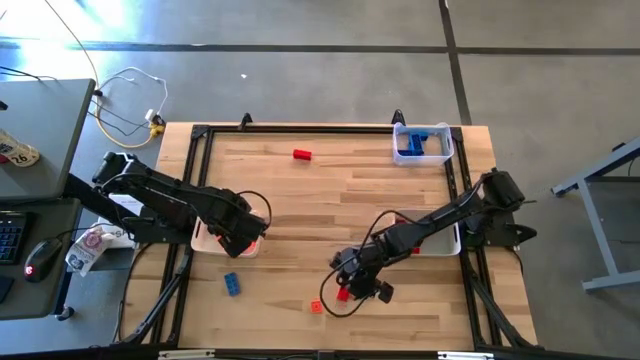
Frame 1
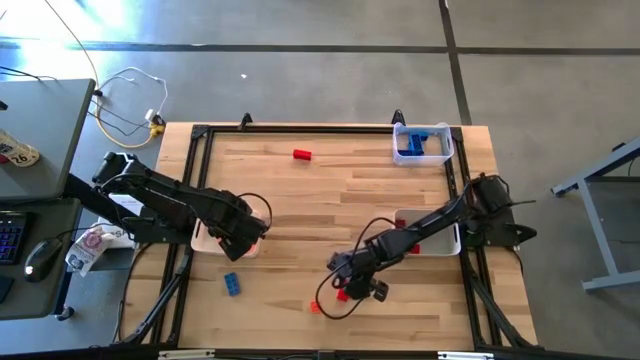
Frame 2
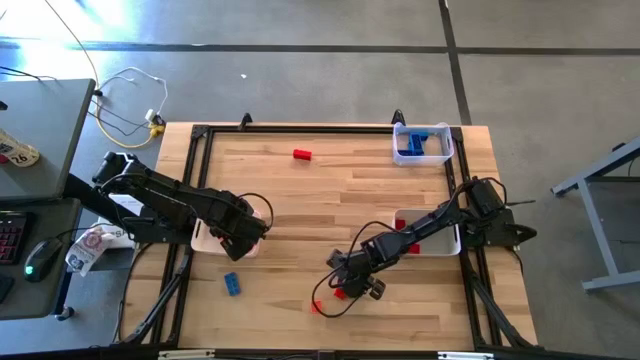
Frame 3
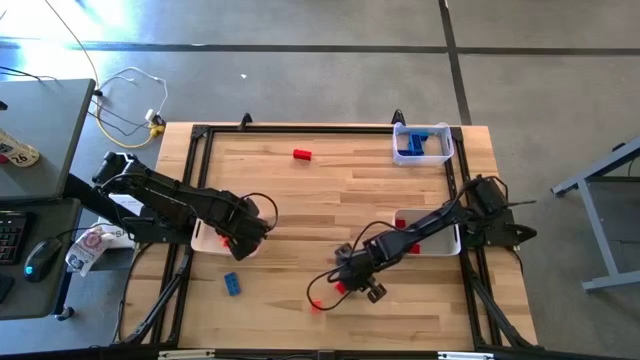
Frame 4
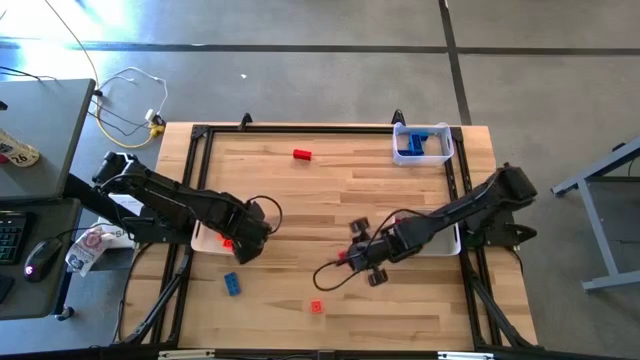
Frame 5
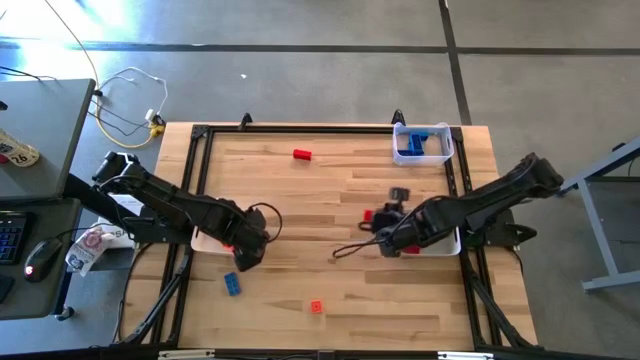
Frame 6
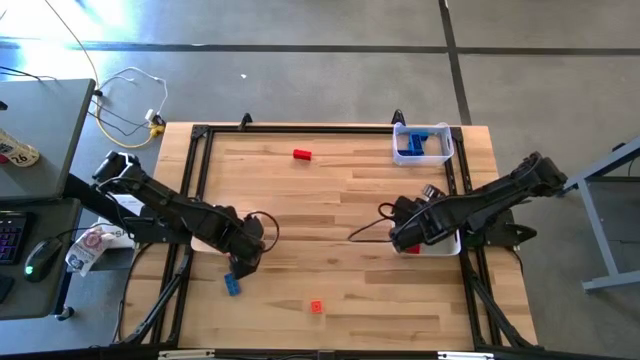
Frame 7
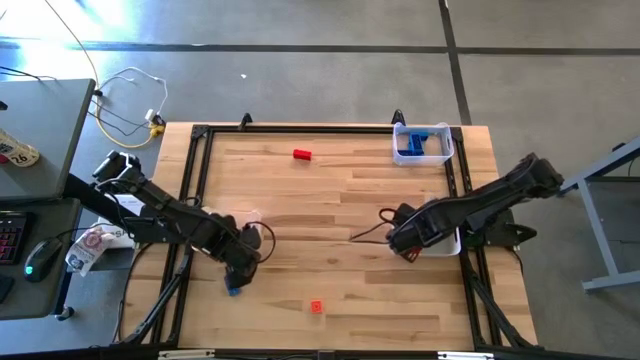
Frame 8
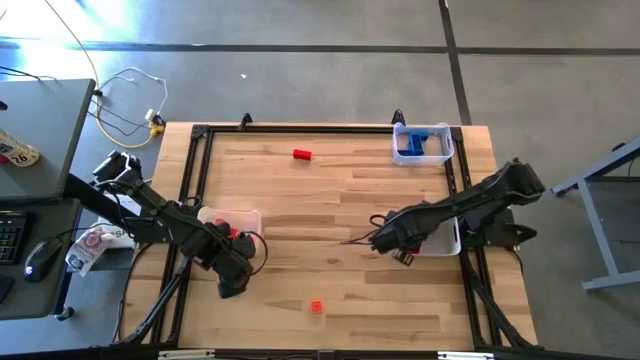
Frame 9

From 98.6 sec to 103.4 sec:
Task: Sort & place blocks by color
Put the red game piece into the gray bin

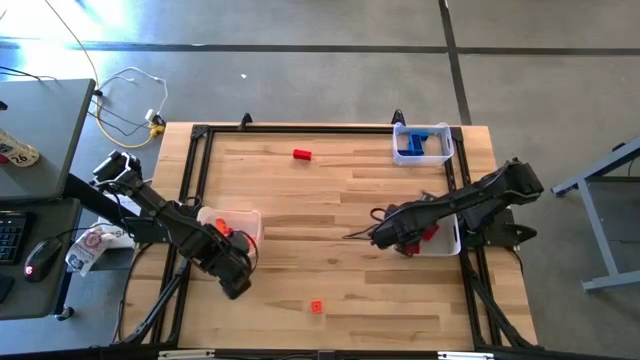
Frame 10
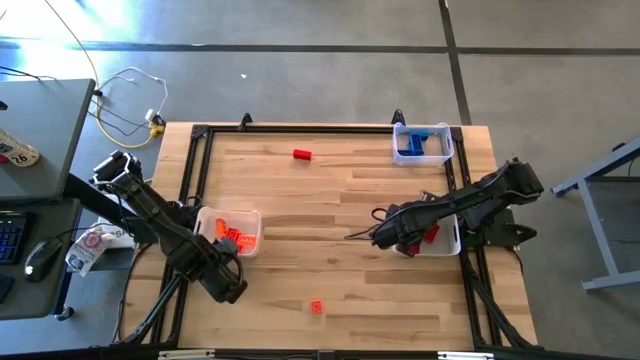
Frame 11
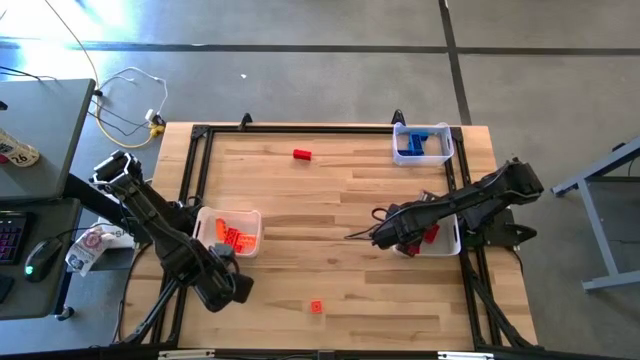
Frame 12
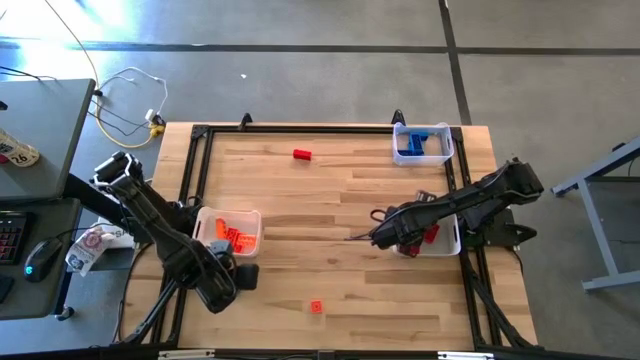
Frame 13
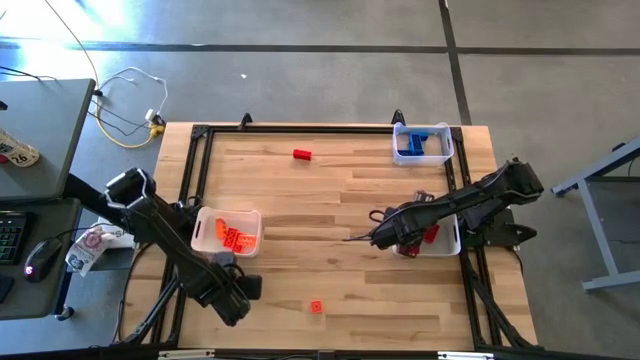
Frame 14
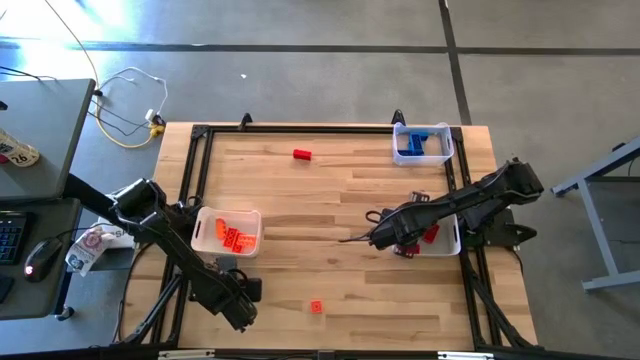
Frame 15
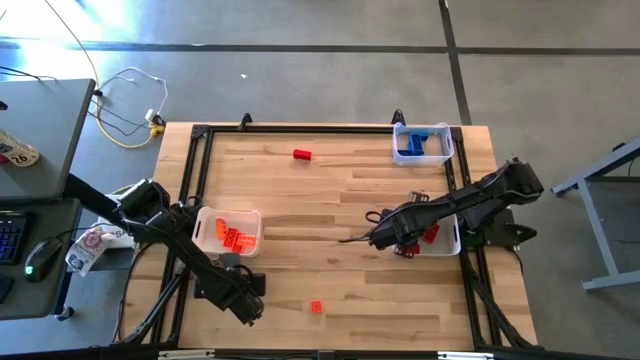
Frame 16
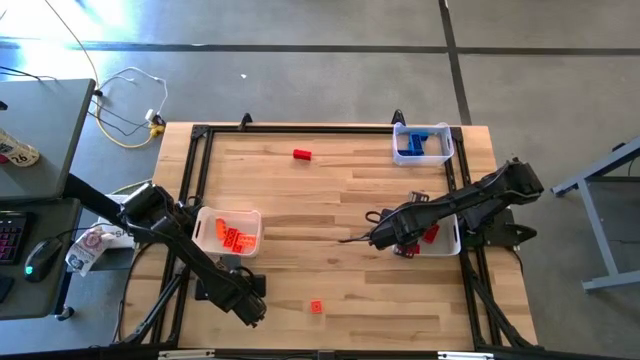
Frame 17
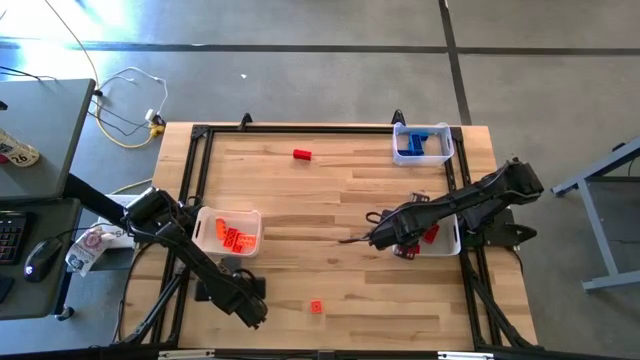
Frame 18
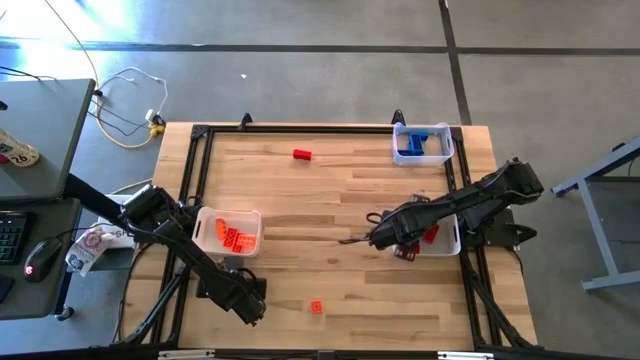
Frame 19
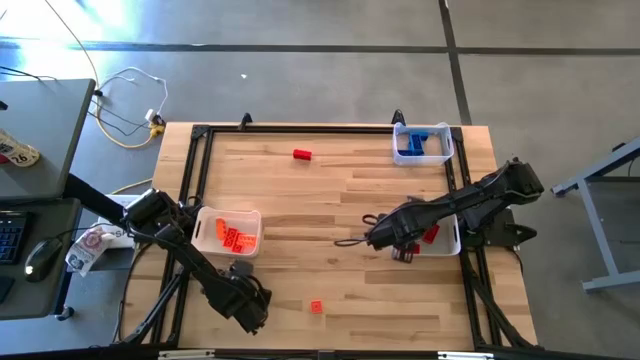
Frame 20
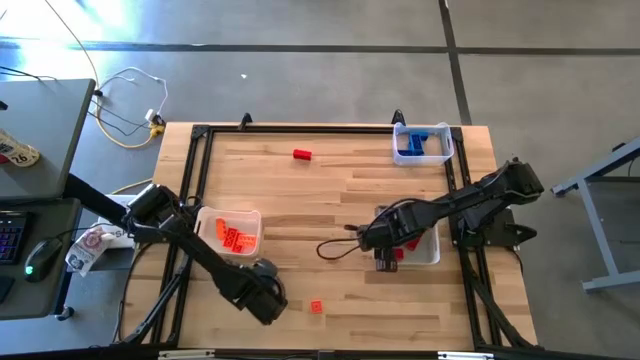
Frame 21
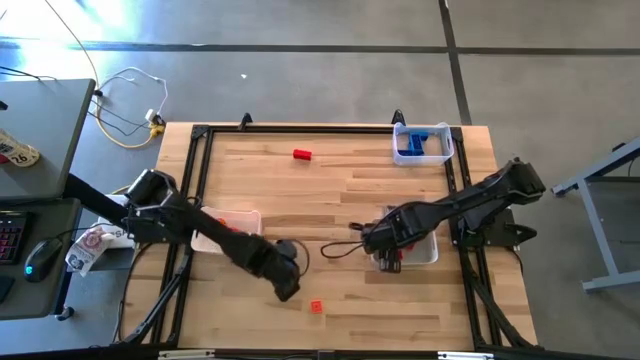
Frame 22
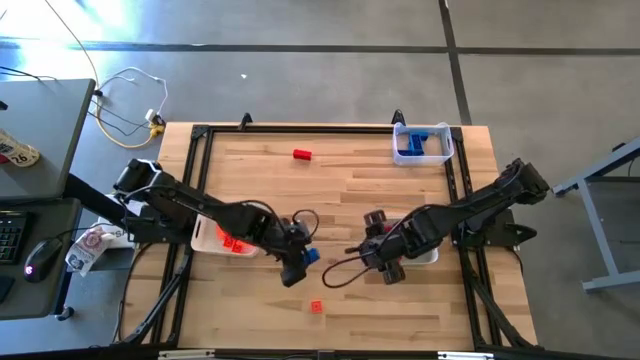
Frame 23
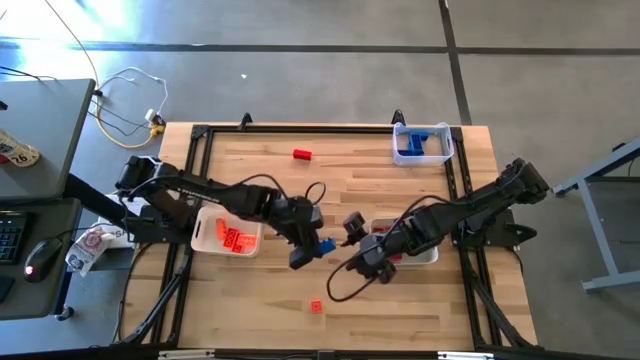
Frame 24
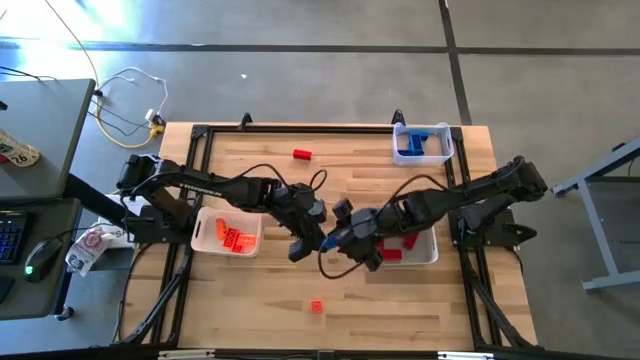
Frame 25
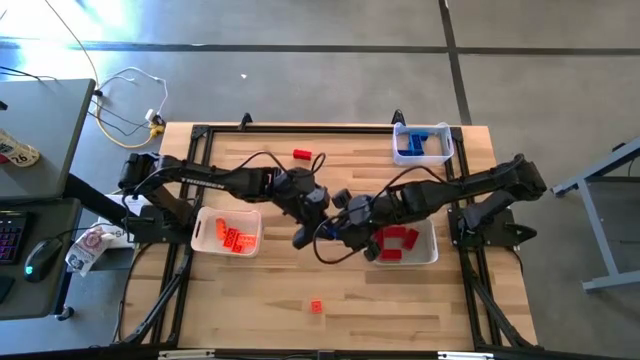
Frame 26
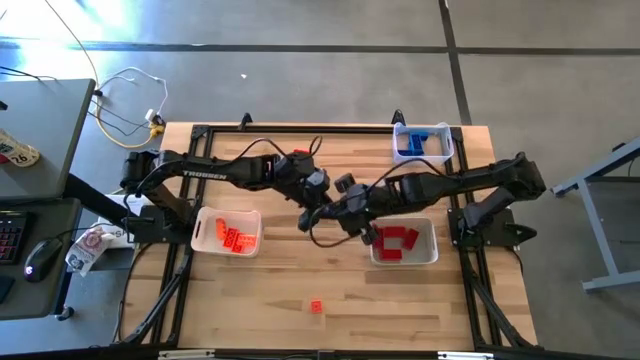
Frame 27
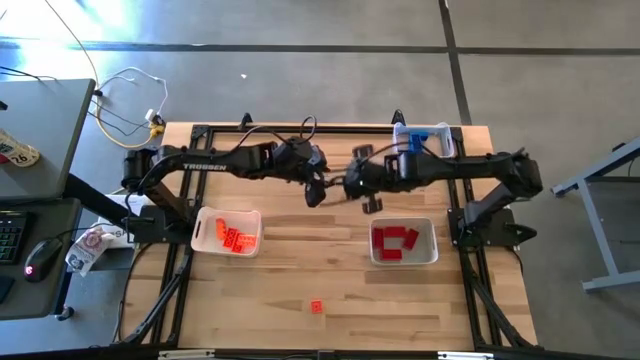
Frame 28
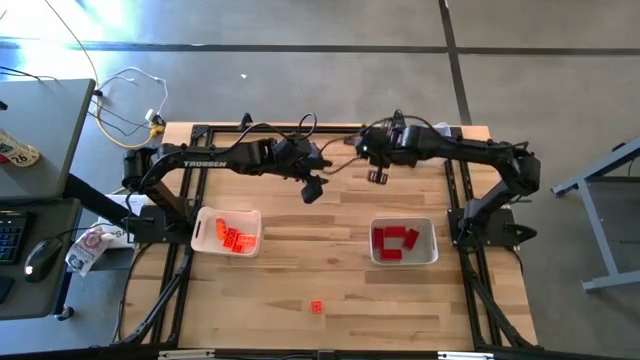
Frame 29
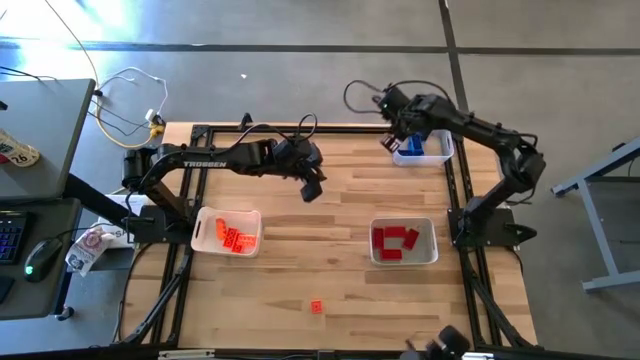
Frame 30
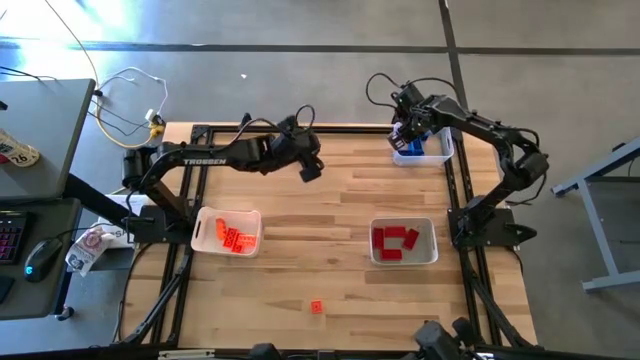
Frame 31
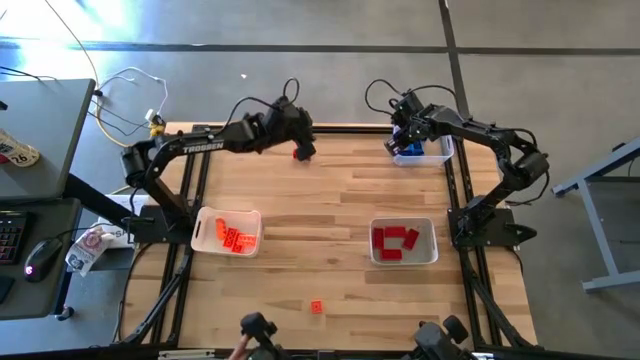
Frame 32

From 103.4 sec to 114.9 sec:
Put the blue game piece into the transparent bin

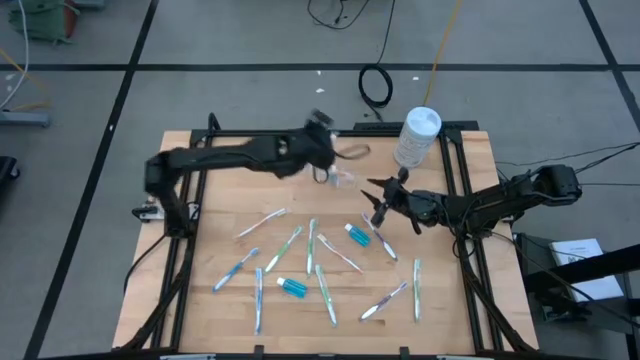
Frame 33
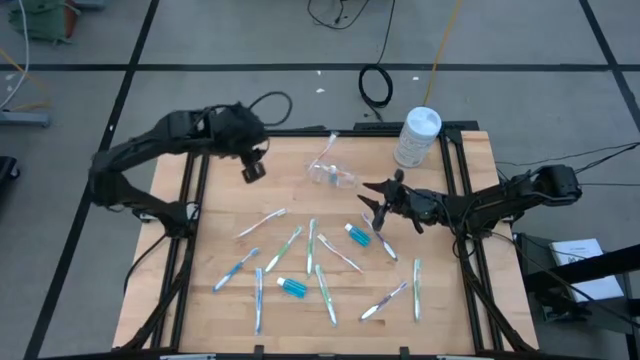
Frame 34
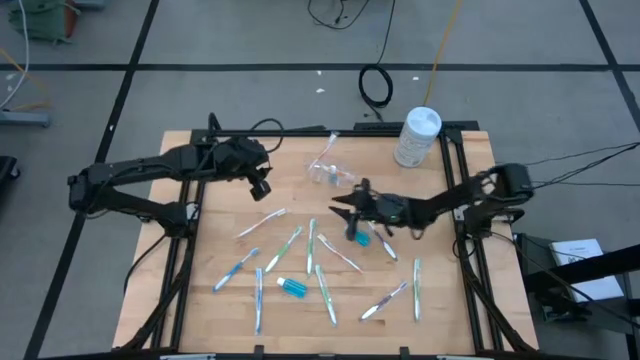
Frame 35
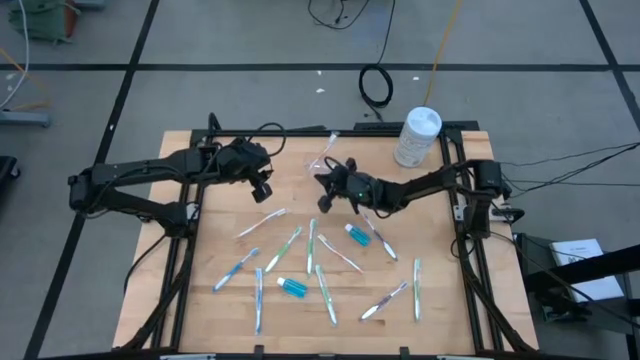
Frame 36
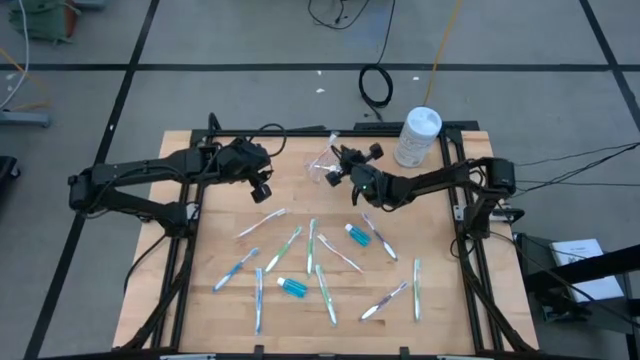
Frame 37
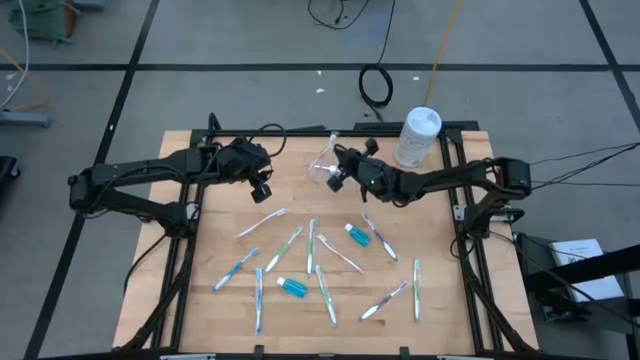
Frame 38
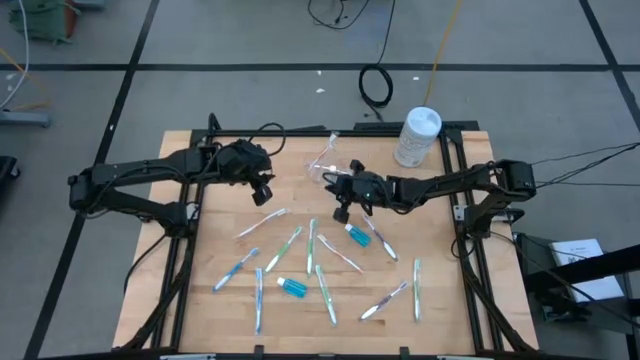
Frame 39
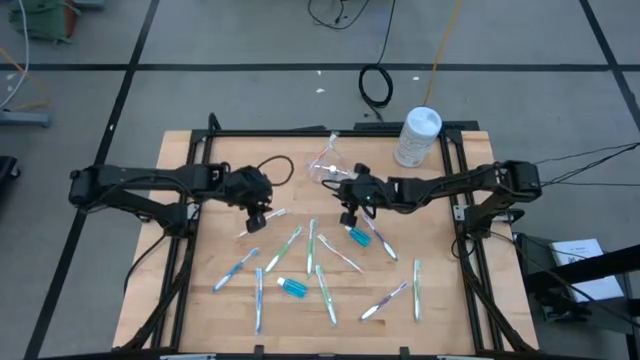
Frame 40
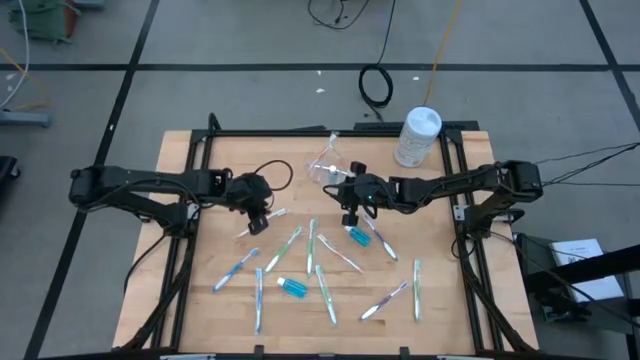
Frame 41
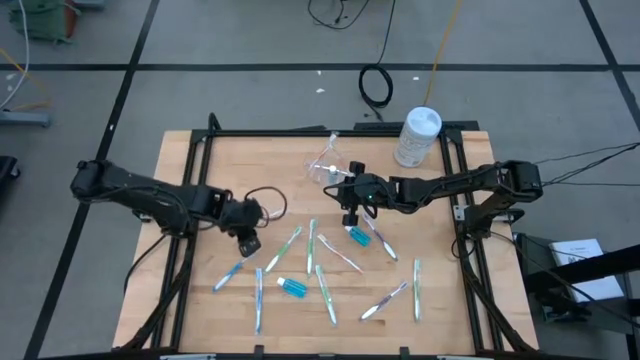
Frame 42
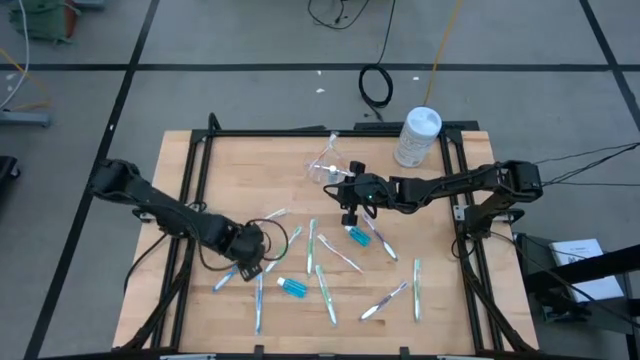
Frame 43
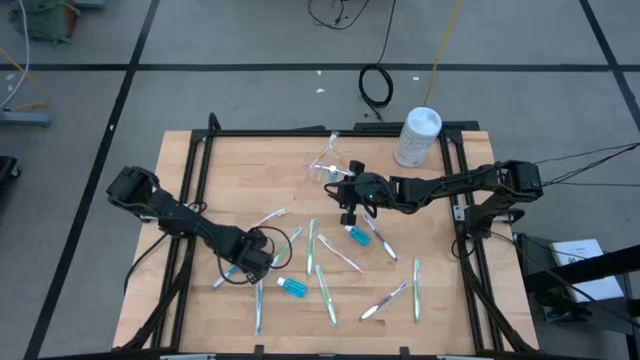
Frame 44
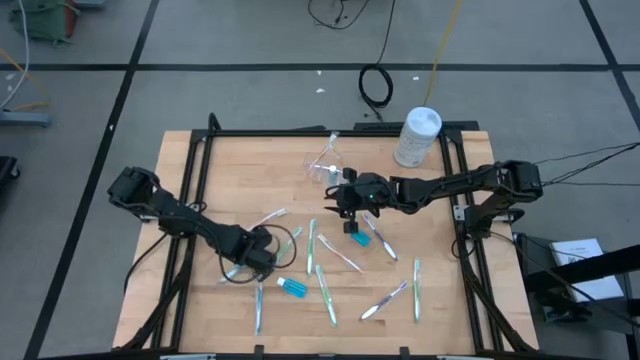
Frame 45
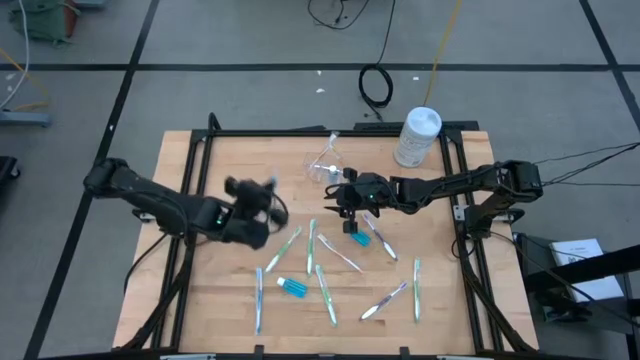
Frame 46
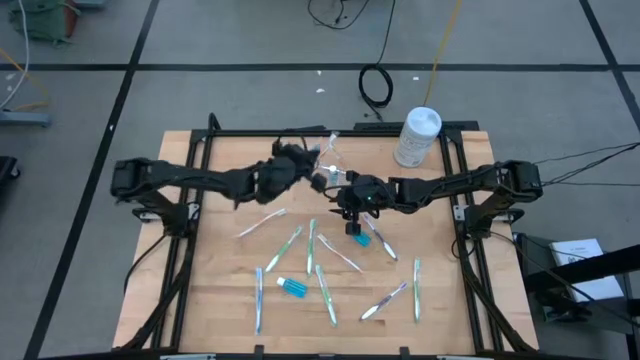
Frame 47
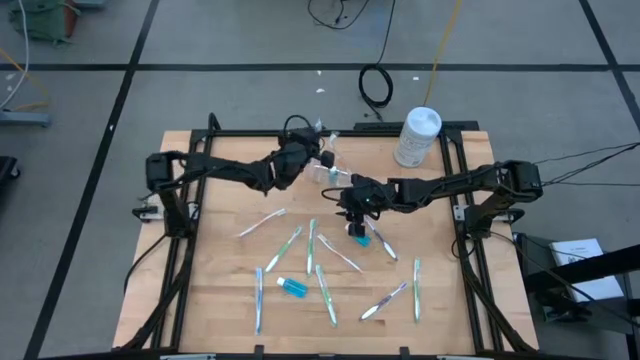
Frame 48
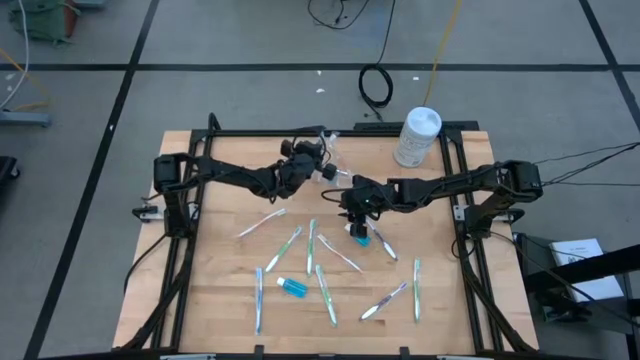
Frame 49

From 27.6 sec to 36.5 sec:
Task: Pick & Place toothbrushing station
Put the blue toothbrush into the transparent organizer
